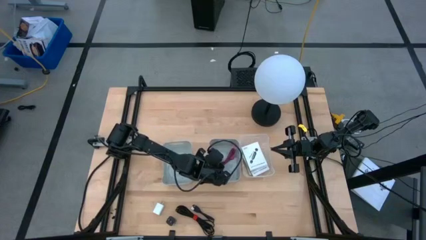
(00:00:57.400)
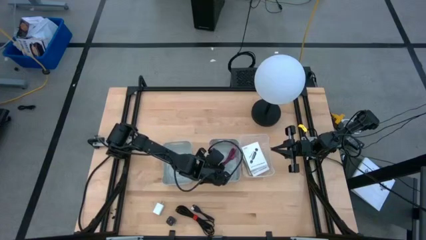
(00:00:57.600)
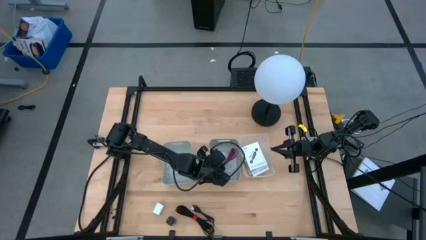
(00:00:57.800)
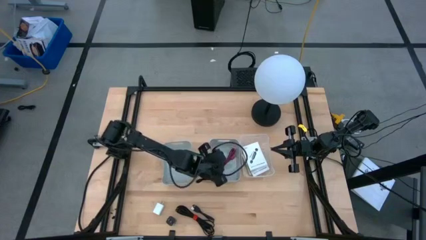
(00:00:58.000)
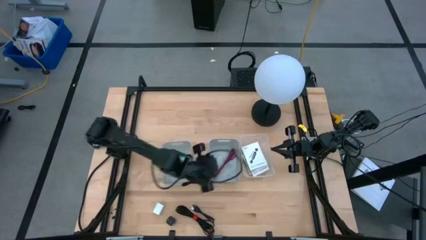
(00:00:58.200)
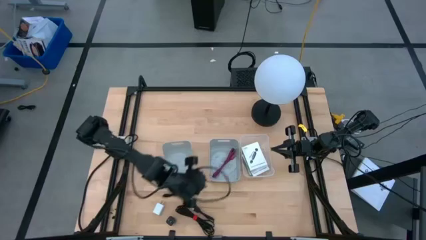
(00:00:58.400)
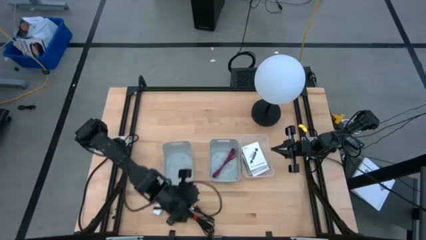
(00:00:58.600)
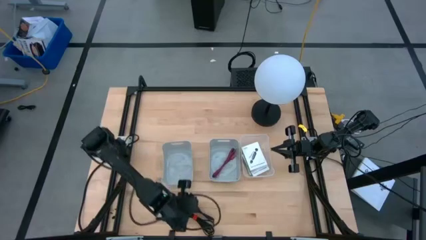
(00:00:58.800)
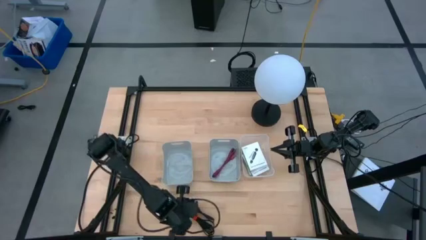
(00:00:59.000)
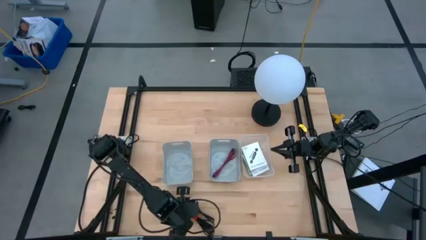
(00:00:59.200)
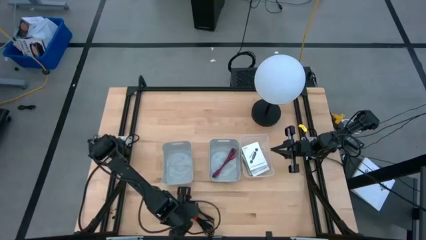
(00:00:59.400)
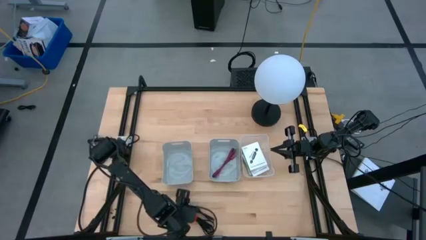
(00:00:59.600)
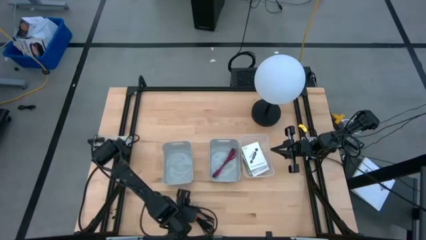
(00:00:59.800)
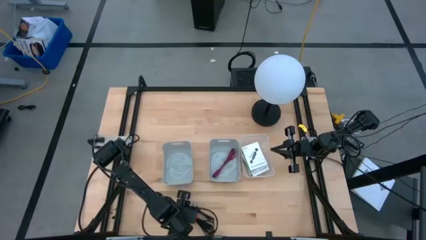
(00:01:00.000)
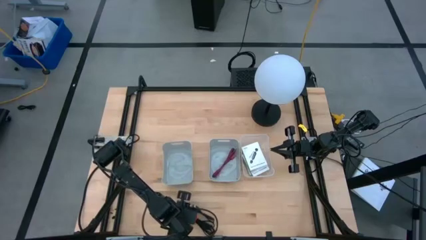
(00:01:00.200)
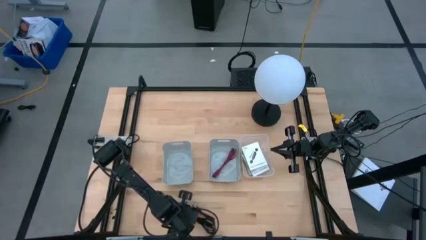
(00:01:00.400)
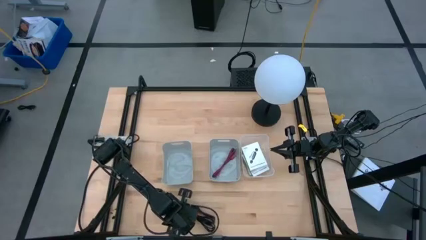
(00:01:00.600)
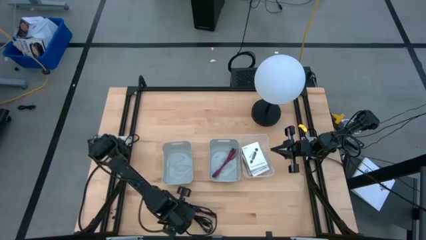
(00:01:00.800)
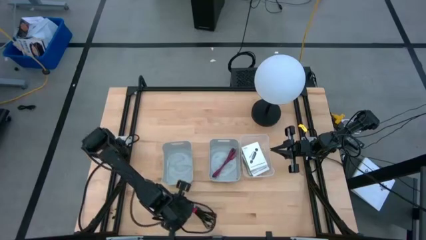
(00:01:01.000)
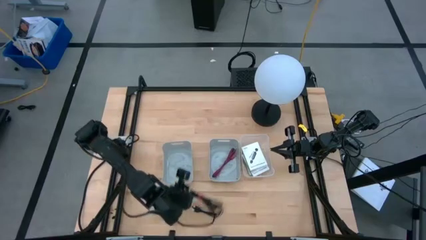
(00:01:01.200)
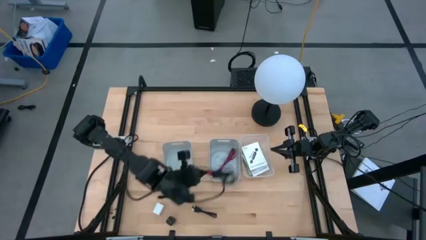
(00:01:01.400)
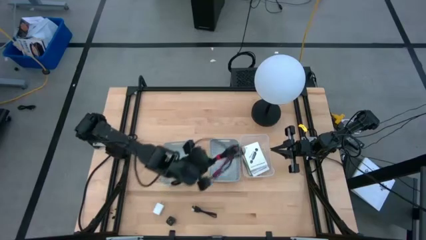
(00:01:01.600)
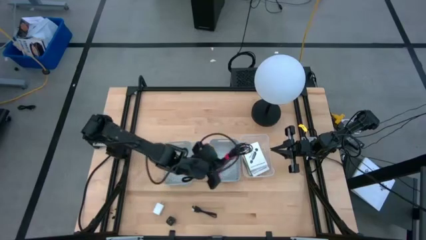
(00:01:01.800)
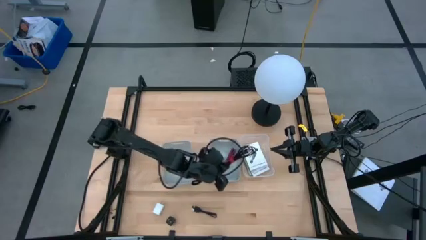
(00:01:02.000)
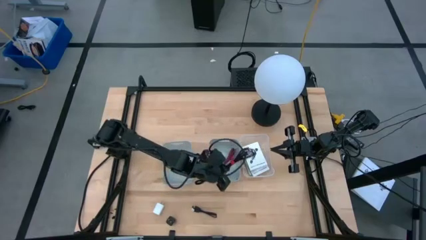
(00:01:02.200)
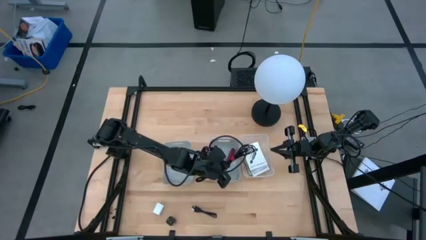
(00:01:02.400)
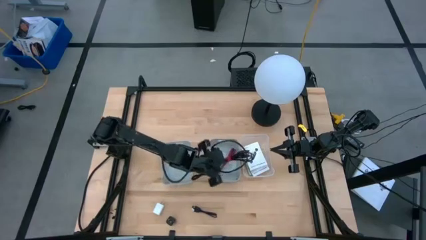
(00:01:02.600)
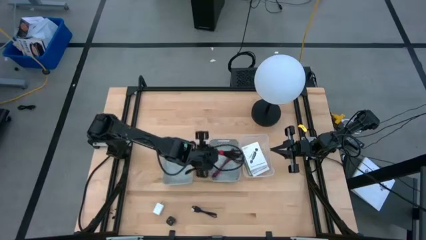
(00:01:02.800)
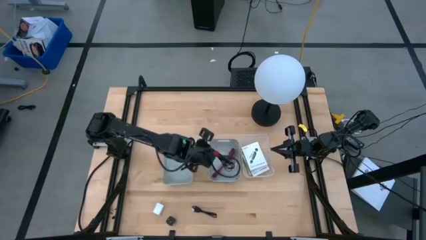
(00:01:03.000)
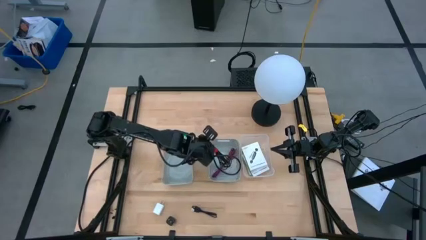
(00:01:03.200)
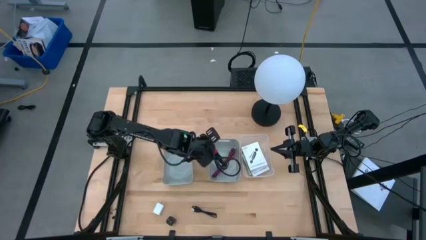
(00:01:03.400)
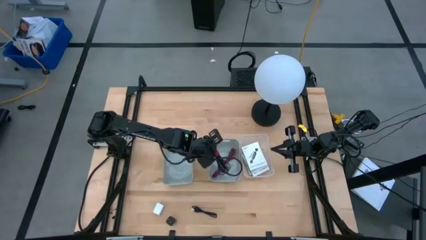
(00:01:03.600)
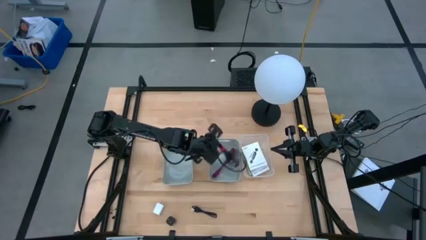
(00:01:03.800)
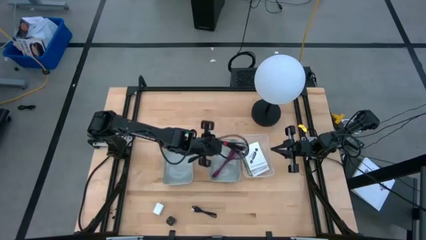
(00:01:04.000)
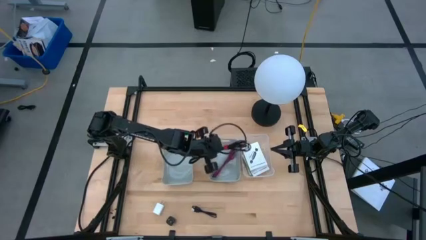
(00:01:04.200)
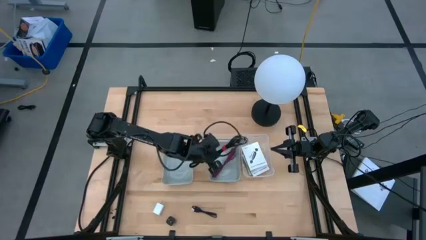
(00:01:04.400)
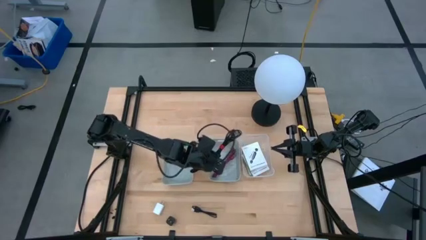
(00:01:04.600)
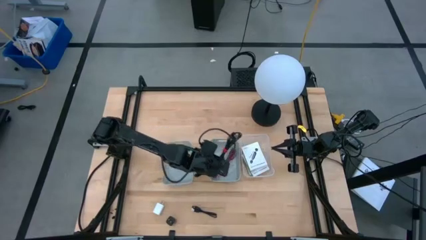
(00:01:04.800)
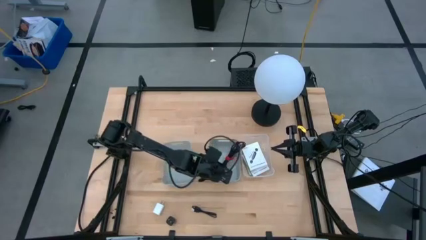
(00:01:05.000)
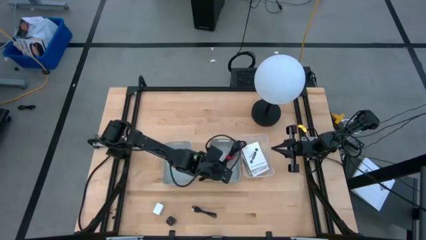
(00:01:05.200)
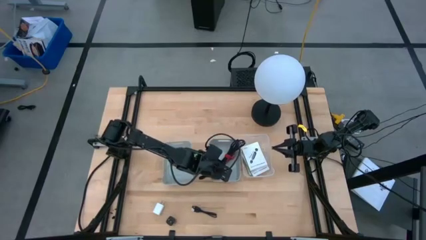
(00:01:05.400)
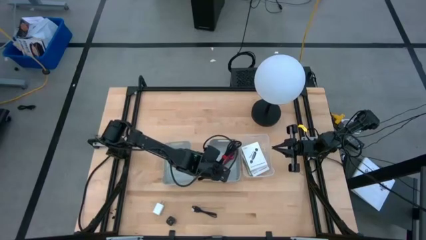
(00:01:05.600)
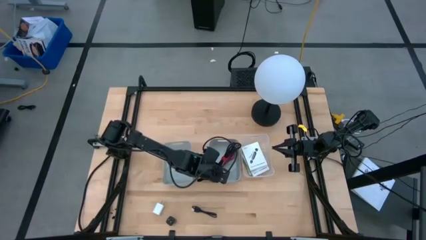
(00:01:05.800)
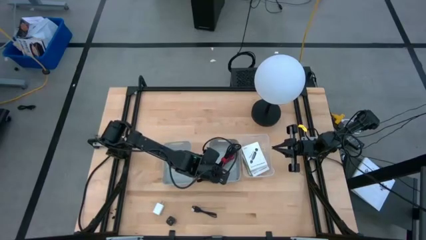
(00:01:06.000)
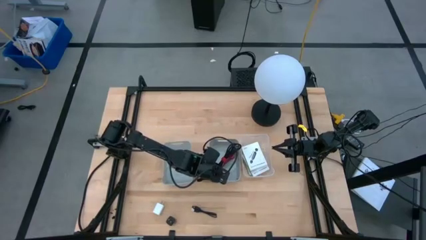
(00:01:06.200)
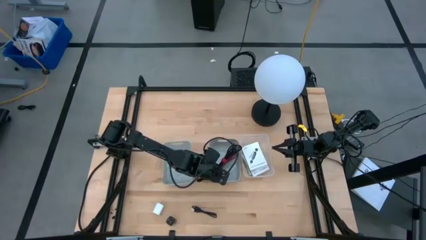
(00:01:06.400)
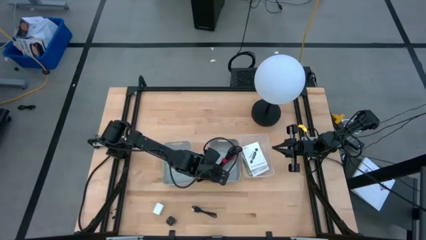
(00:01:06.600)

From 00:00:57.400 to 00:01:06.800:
Task: Pick and place items into bin
Put the bottom black USB cable into the right gray bin

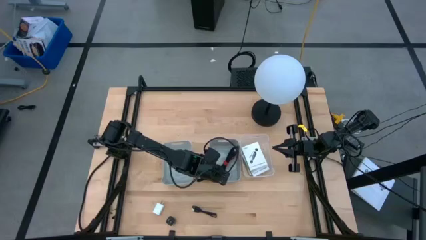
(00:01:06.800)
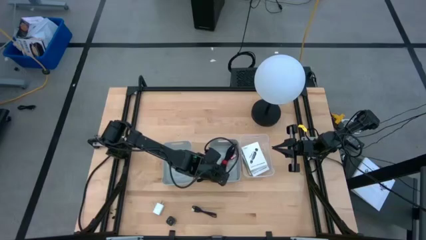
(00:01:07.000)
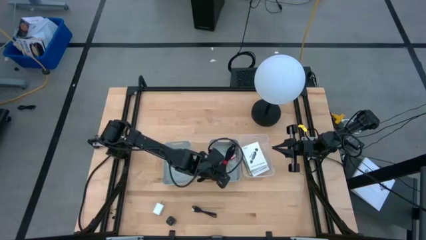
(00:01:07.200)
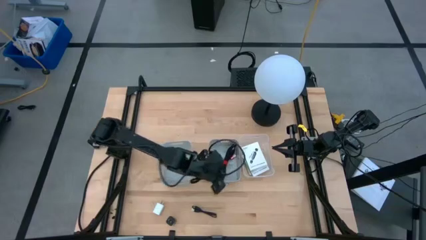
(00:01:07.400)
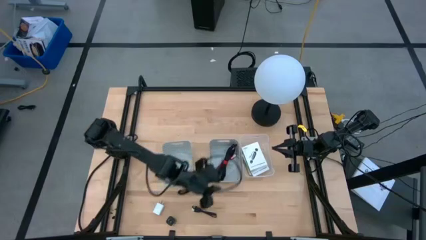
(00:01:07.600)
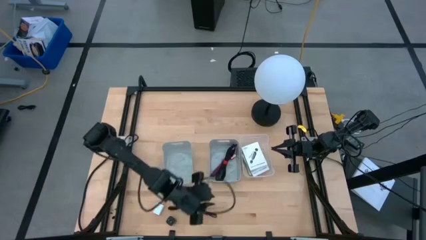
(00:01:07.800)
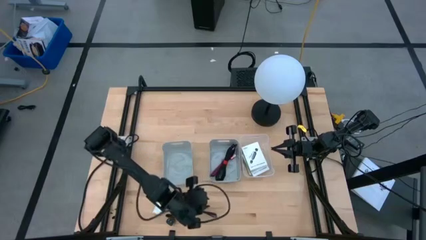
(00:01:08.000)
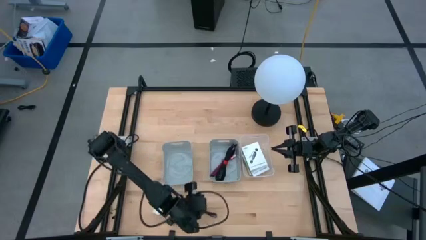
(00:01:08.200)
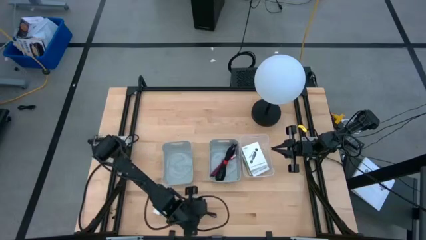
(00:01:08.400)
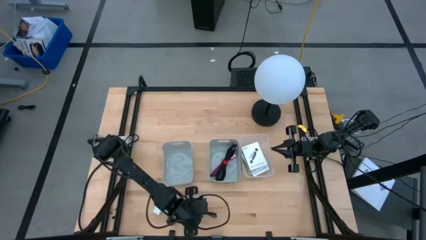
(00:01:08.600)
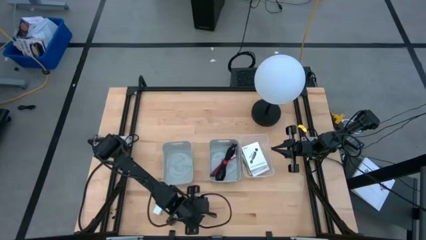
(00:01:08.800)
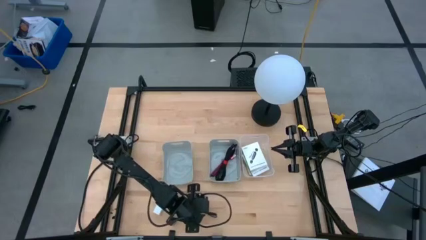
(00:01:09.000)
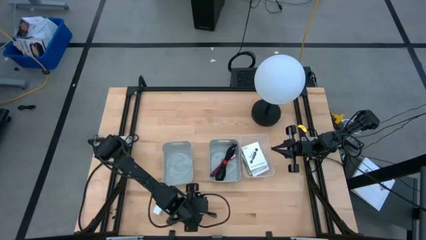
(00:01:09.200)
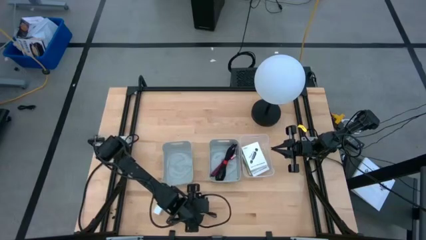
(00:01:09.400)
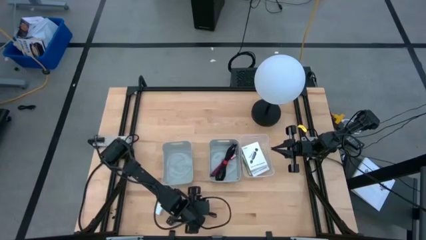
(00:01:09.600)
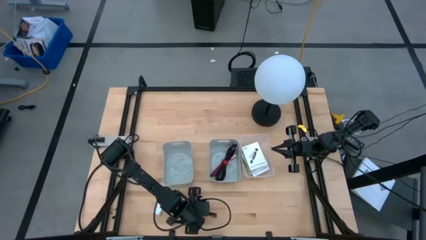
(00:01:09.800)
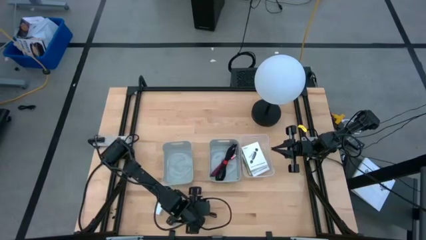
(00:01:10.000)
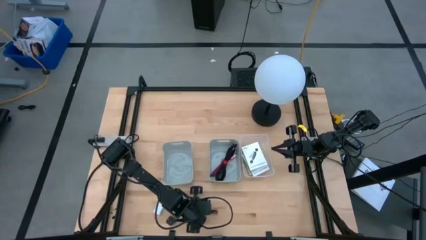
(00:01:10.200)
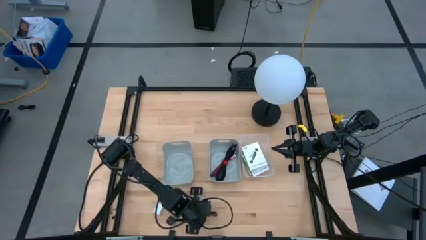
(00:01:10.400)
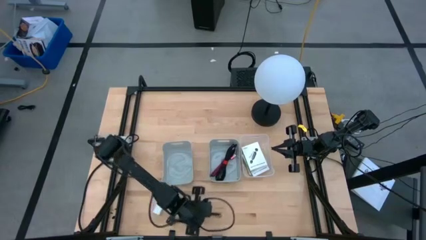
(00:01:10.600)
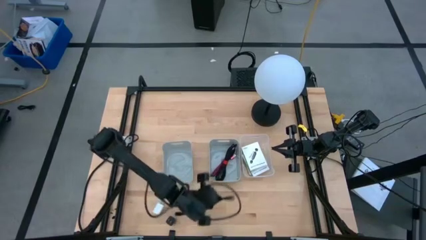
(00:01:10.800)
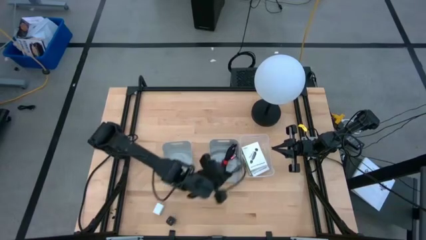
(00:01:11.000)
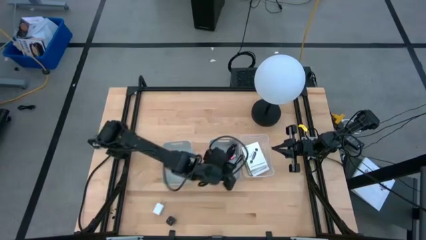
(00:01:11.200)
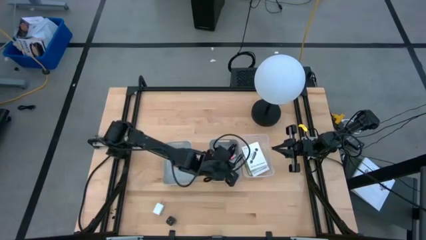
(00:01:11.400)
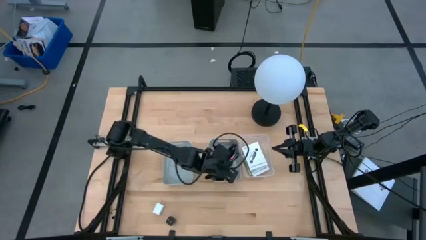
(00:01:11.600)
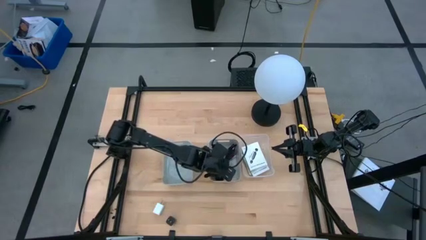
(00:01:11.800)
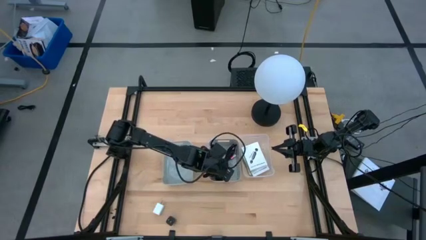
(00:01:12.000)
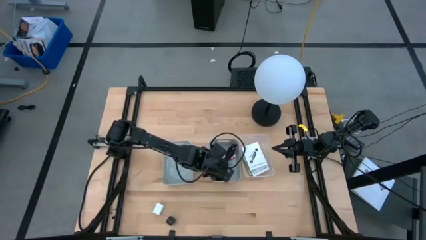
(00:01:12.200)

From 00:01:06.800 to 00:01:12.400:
Put the black USB cable into the right gray bin
